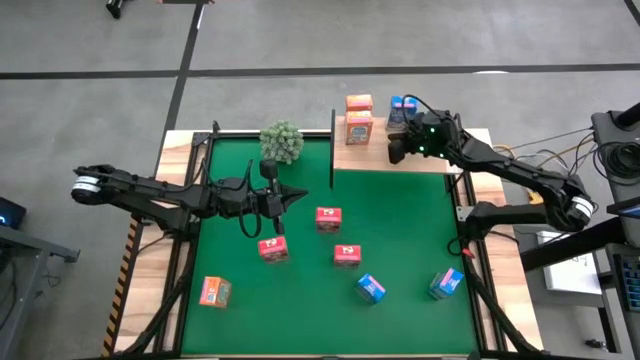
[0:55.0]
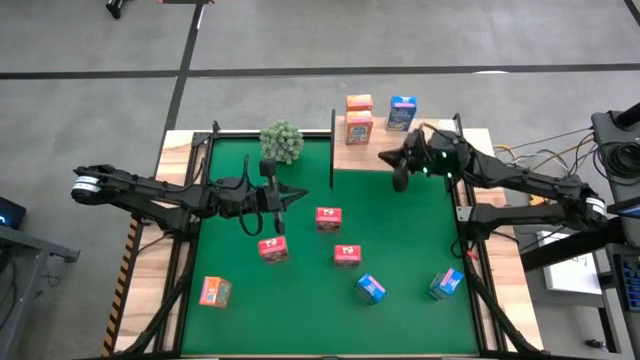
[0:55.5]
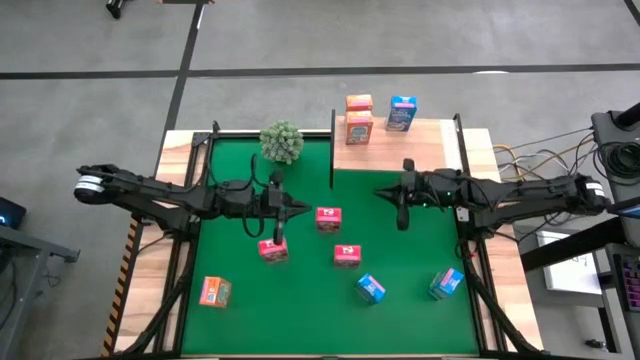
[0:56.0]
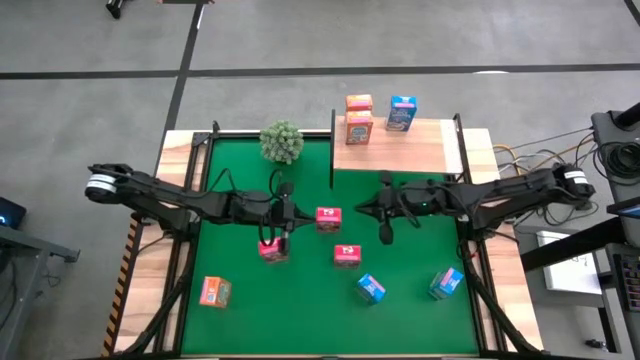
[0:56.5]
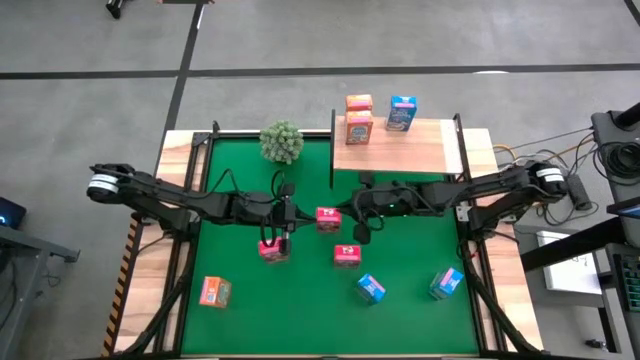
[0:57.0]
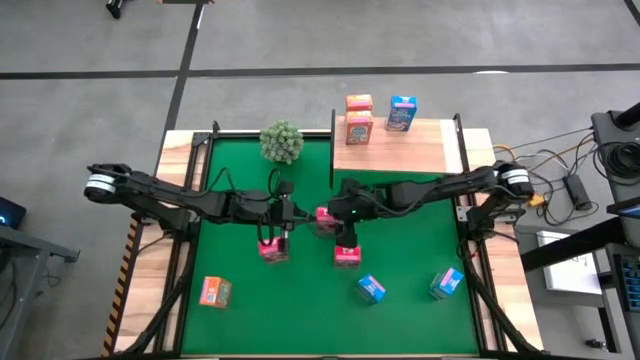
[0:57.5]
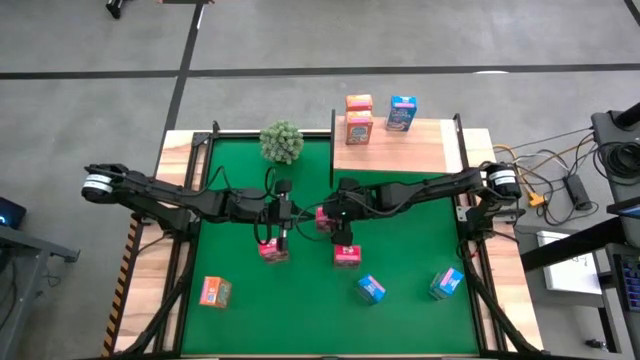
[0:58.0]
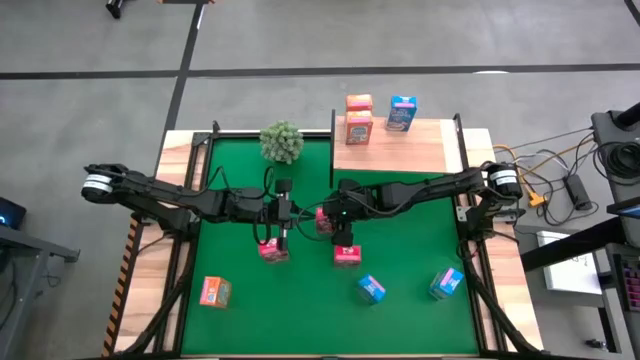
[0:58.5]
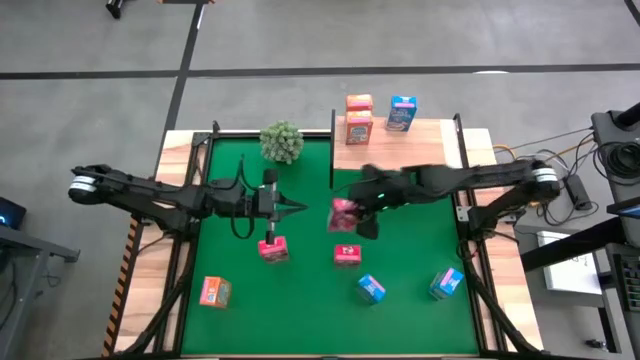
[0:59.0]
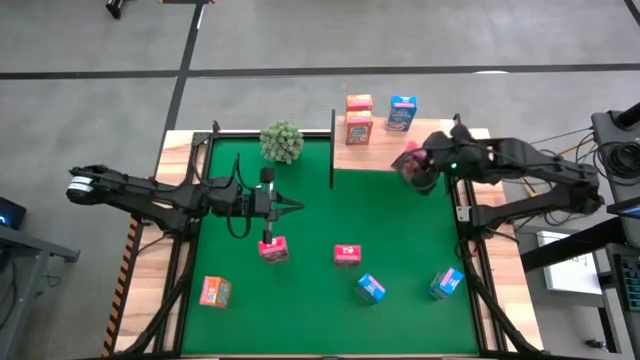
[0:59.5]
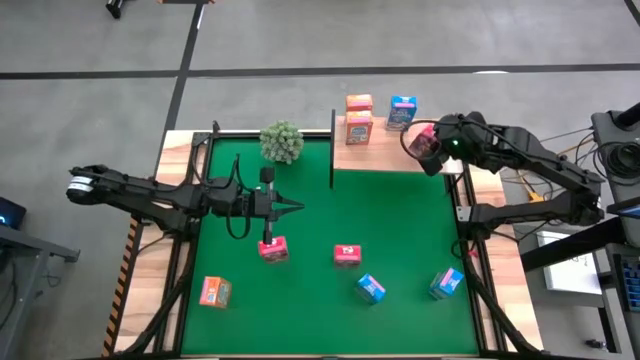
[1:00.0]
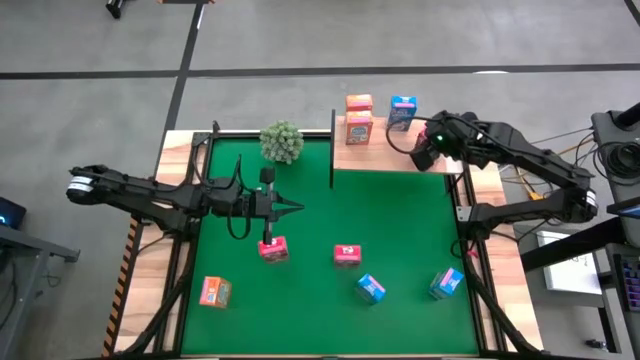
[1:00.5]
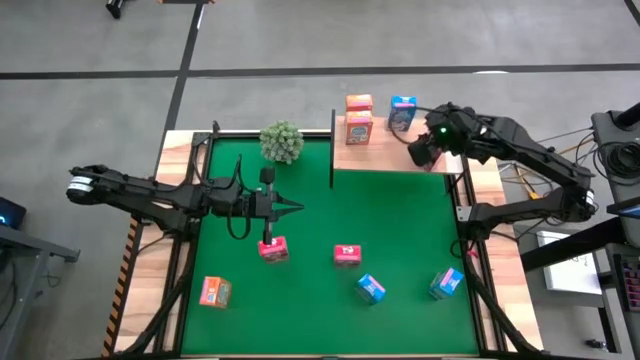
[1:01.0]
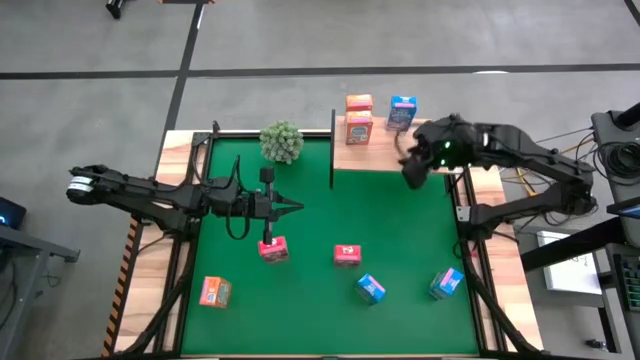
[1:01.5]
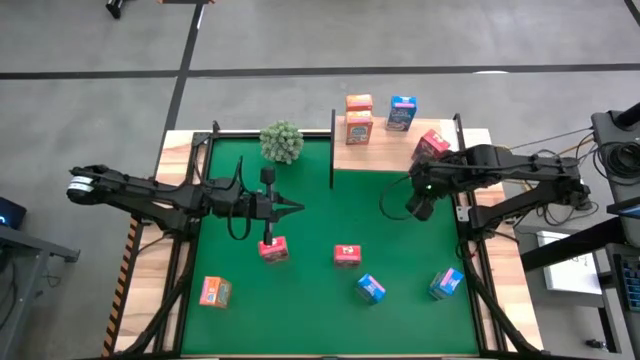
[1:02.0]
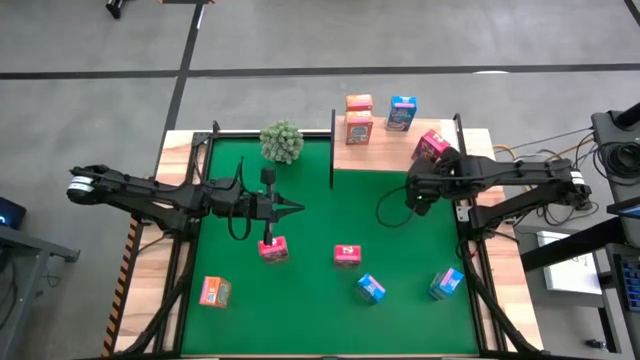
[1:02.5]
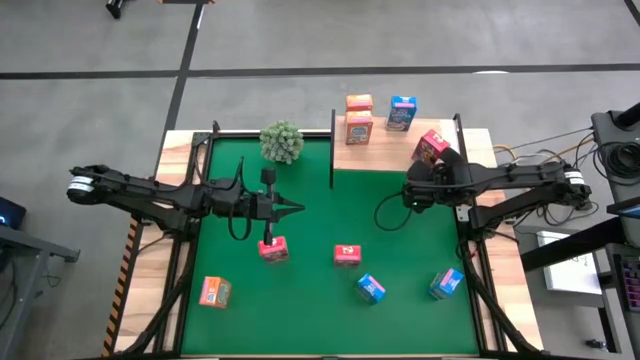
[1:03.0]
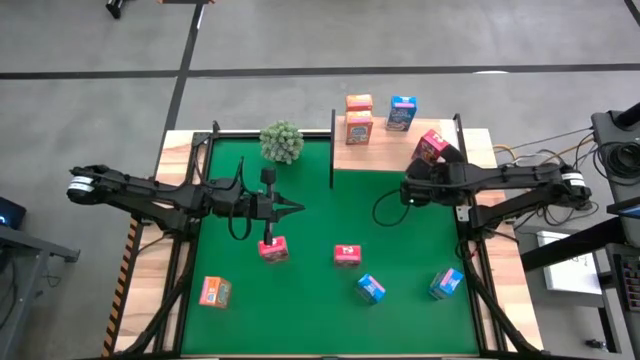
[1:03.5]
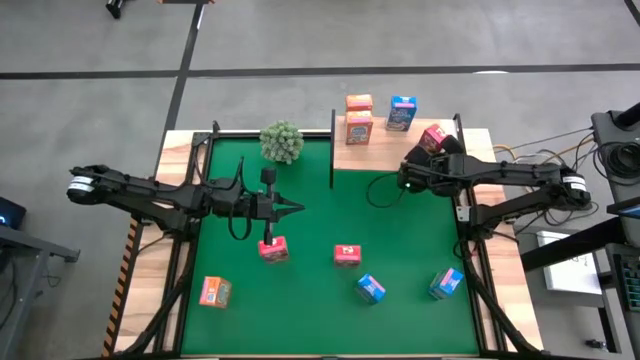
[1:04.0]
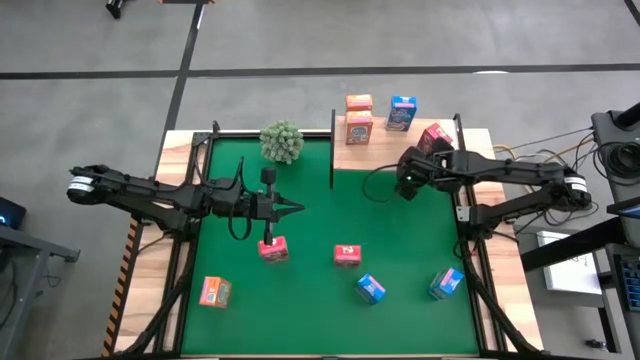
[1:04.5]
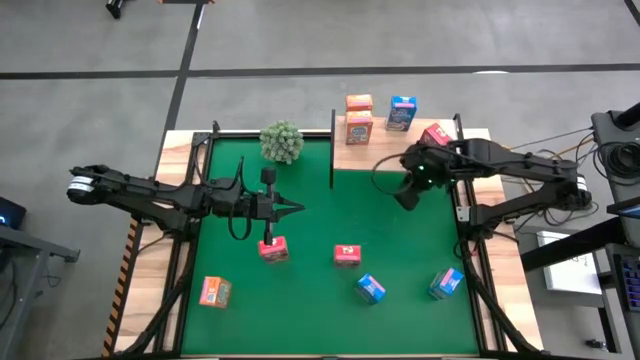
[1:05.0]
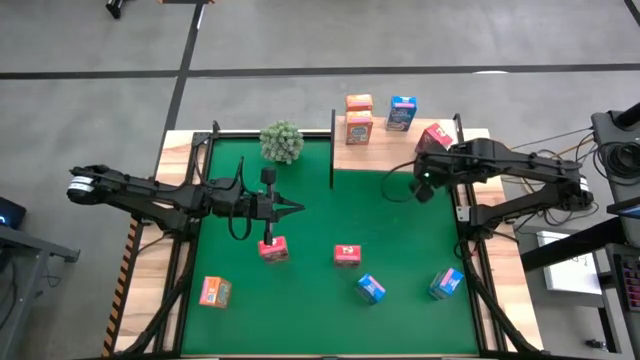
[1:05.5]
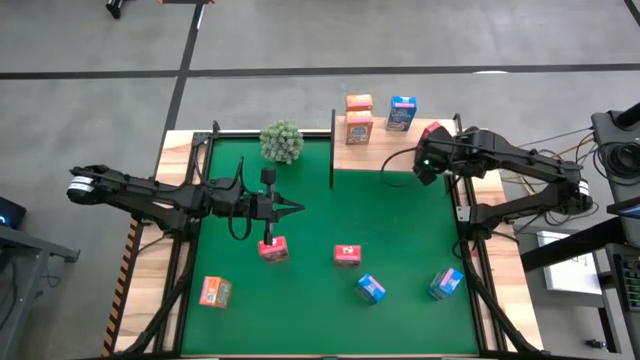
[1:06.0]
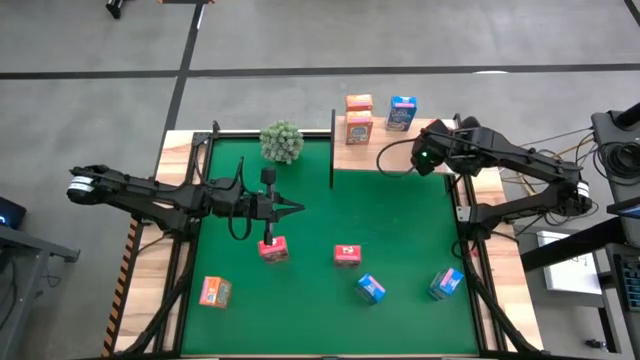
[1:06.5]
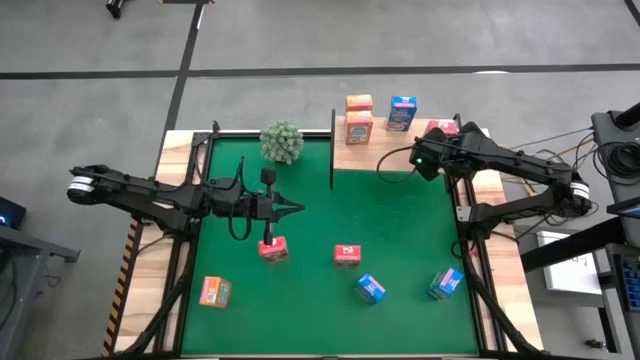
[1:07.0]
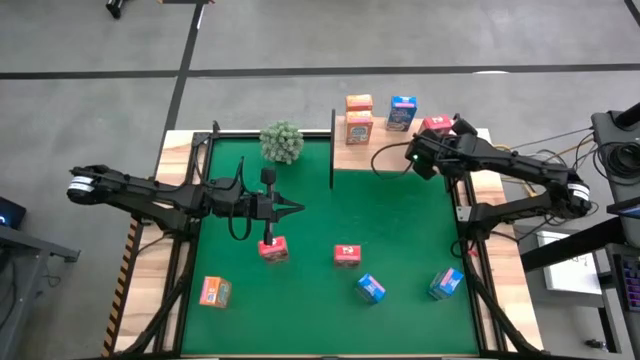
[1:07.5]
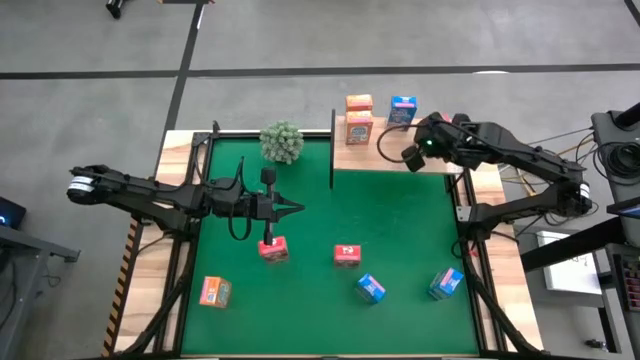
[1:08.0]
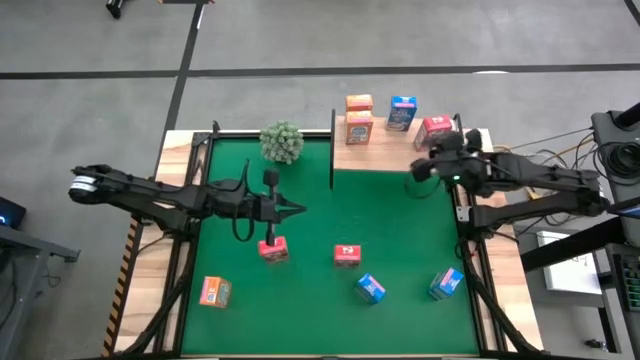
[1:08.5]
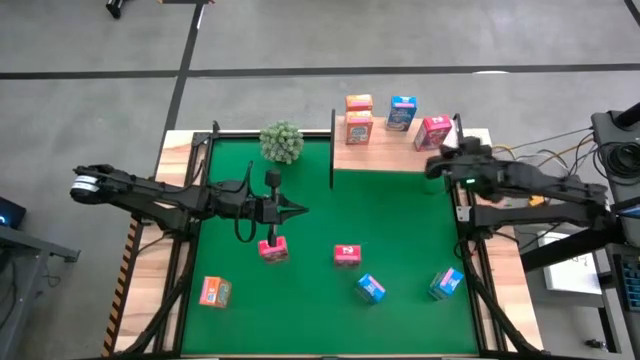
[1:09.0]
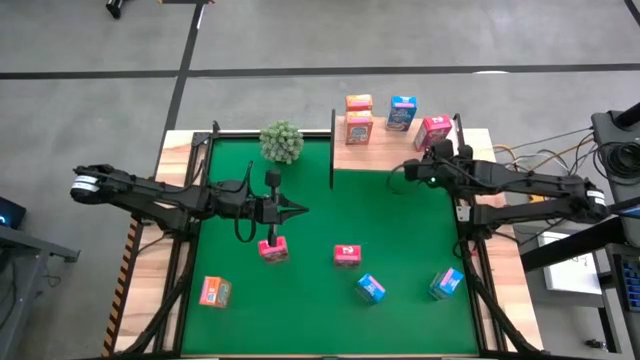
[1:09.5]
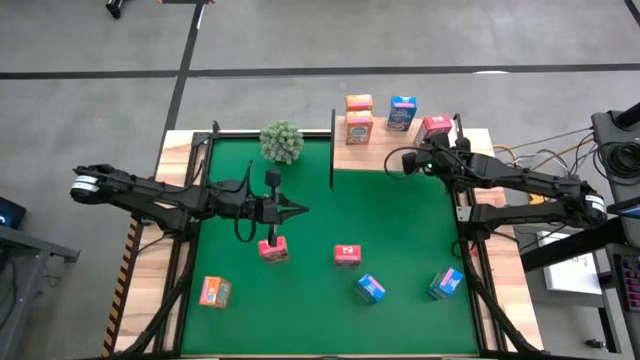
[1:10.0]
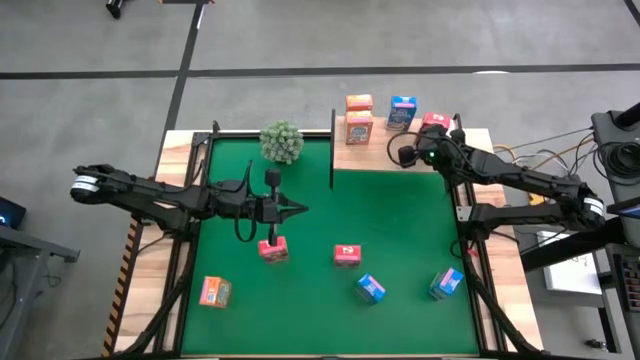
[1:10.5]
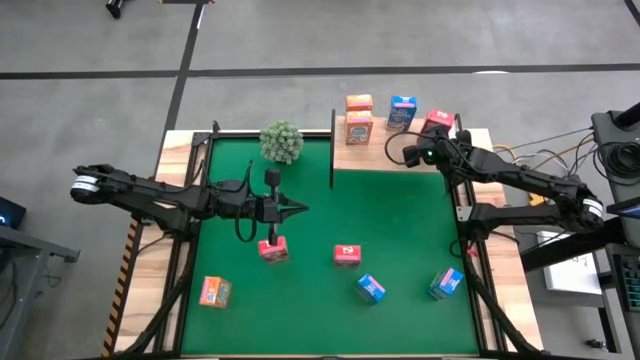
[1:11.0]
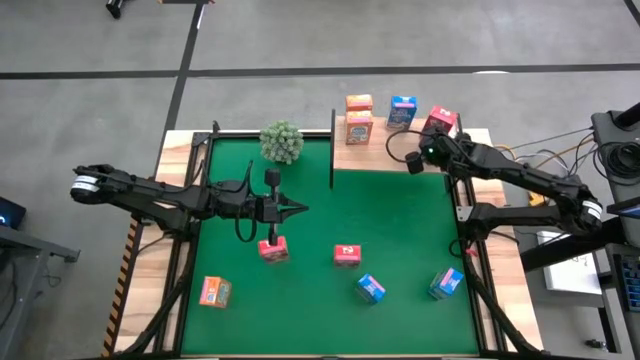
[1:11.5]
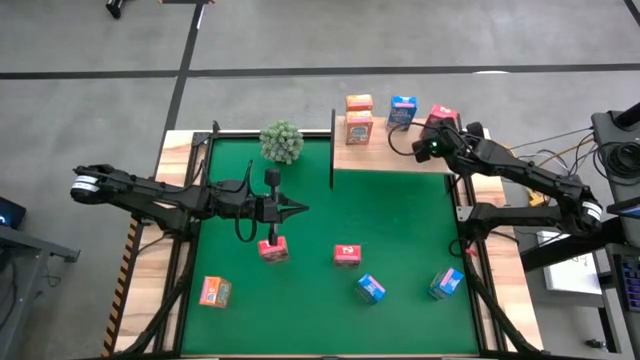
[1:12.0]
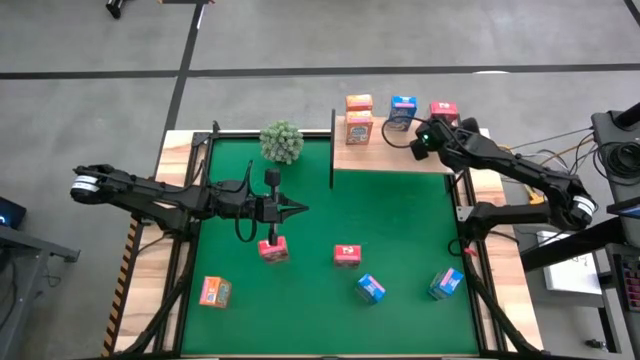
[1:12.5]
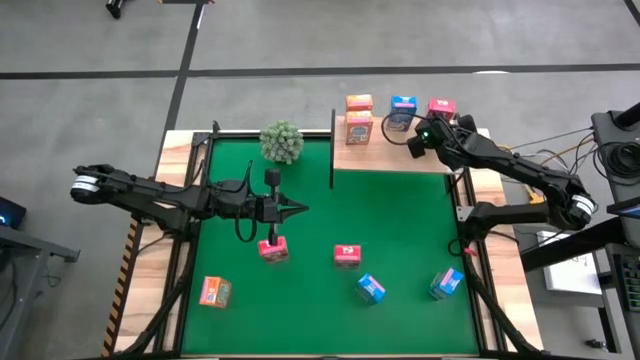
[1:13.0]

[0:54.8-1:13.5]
Task: Stack cereal on shelf
Put the top red cereal box on the shelf

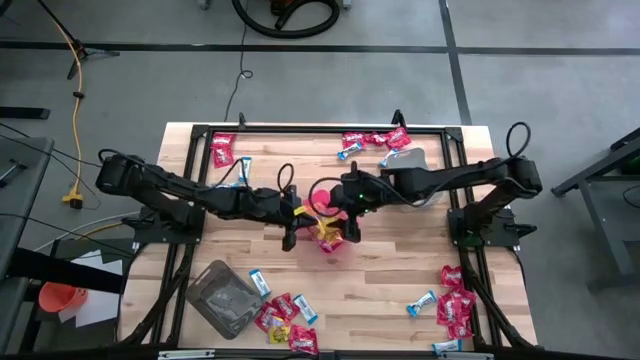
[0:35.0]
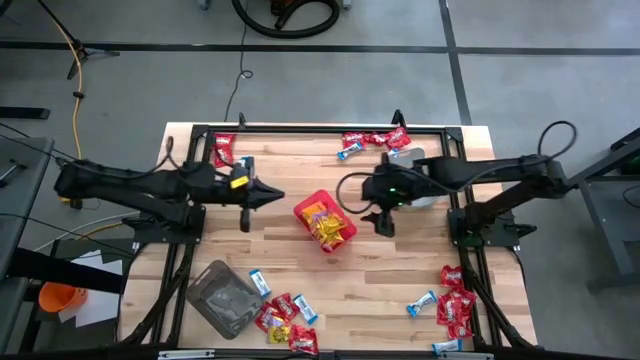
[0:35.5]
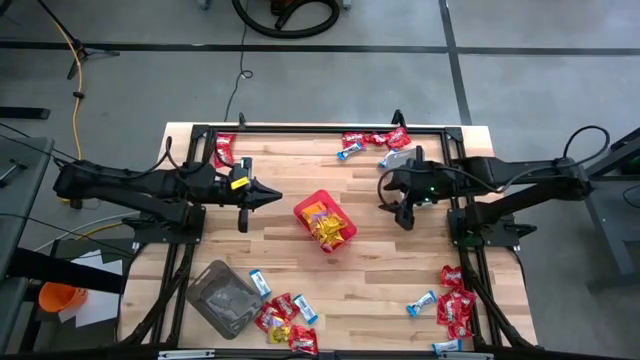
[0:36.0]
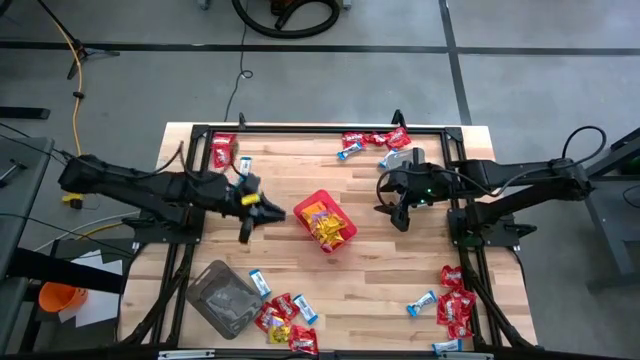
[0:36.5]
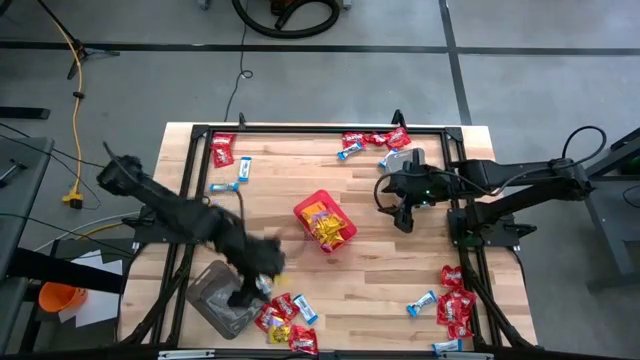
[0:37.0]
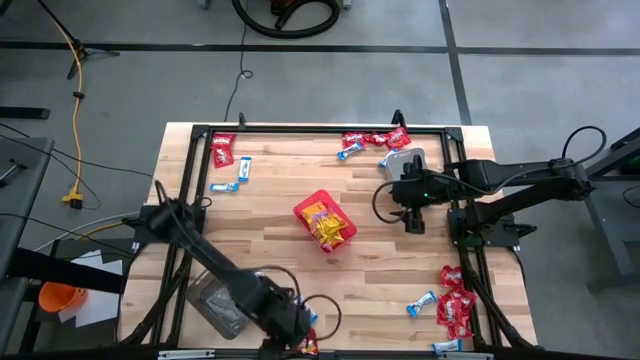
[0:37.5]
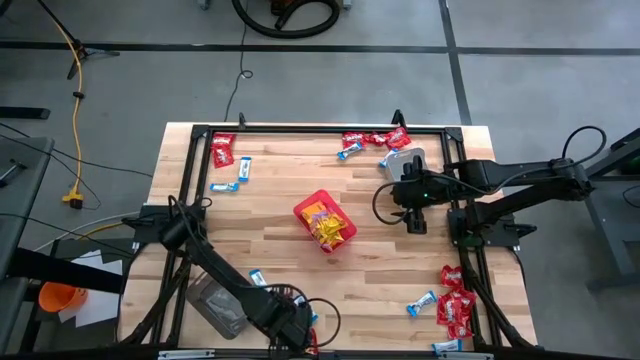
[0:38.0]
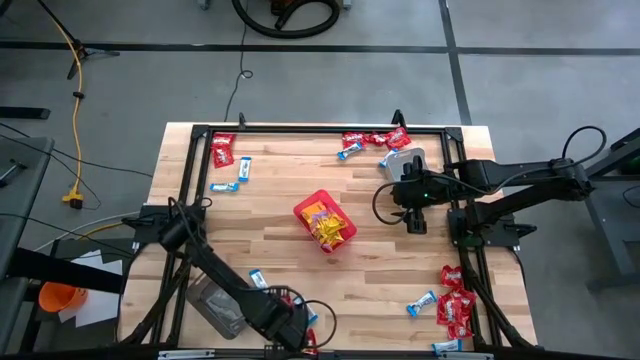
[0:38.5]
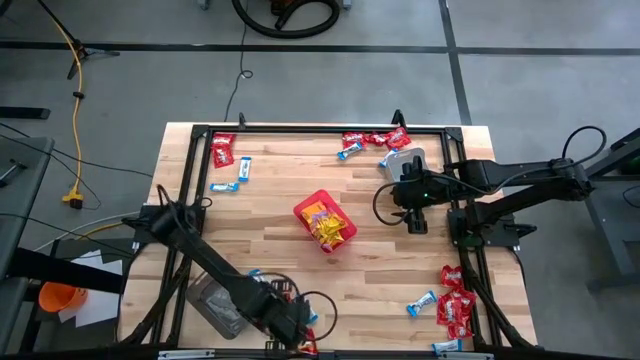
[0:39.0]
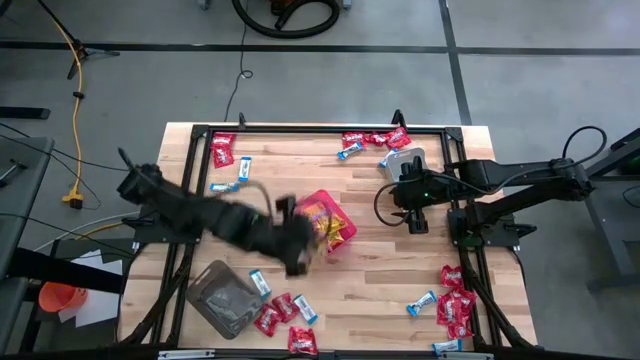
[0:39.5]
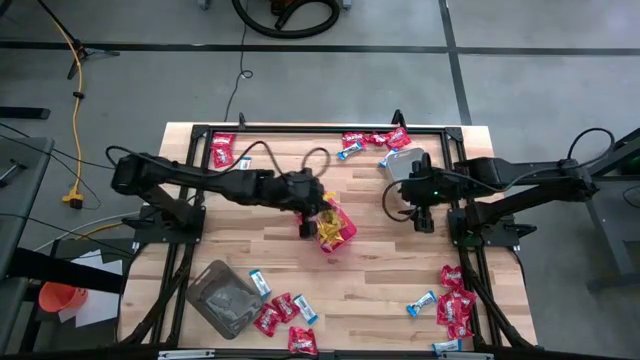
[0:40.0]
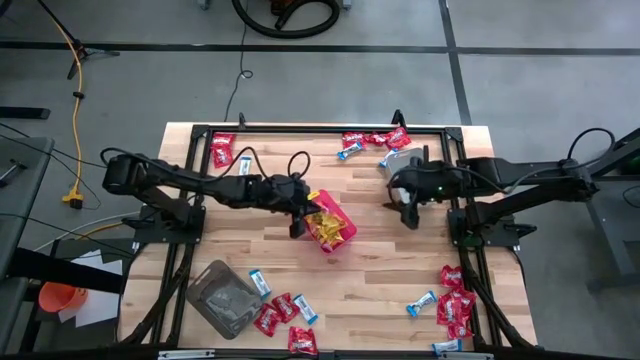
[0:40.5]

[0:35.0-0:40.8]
Task: Sort candy
Put the yellow candy into the red bin
